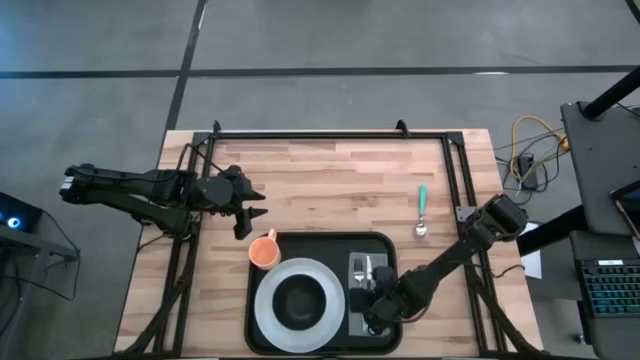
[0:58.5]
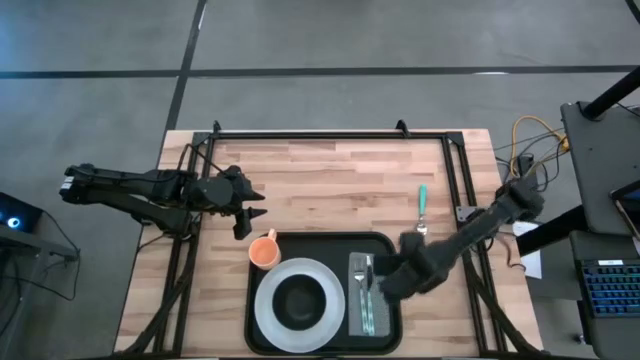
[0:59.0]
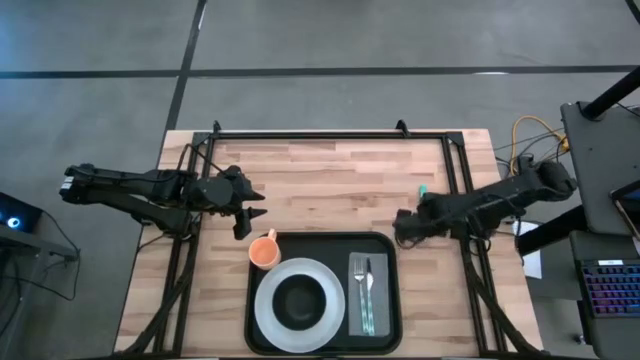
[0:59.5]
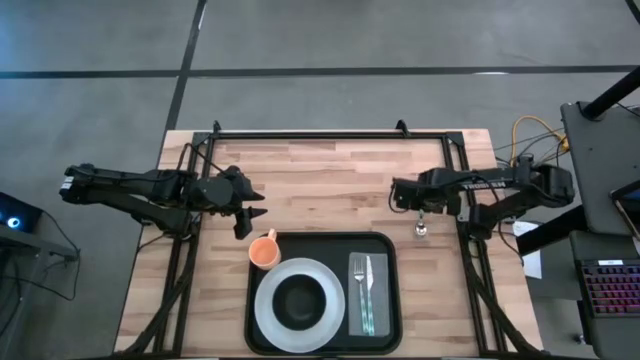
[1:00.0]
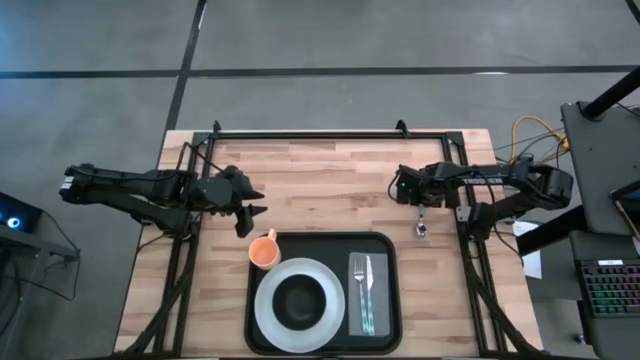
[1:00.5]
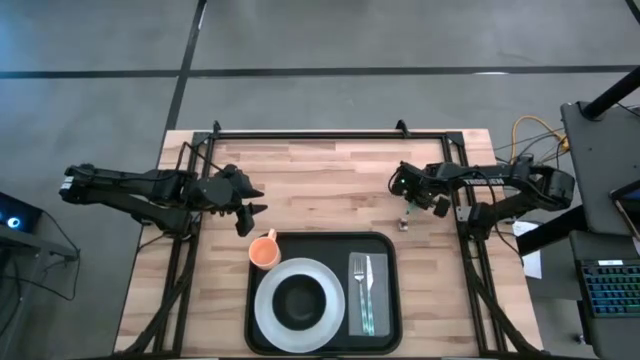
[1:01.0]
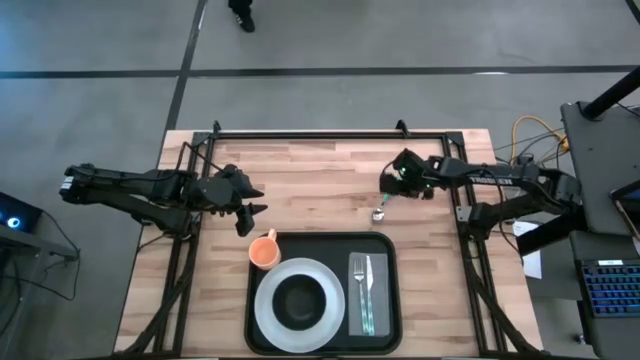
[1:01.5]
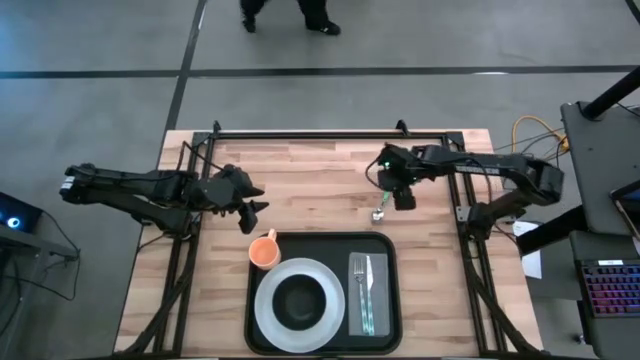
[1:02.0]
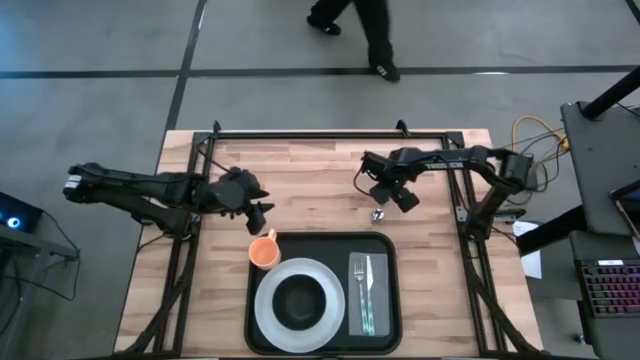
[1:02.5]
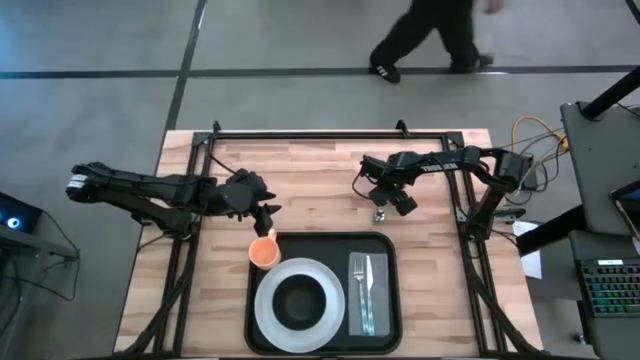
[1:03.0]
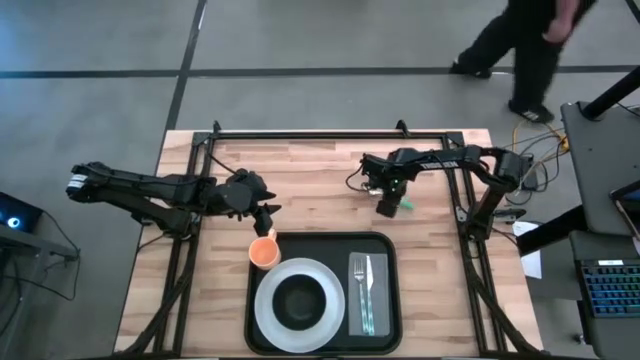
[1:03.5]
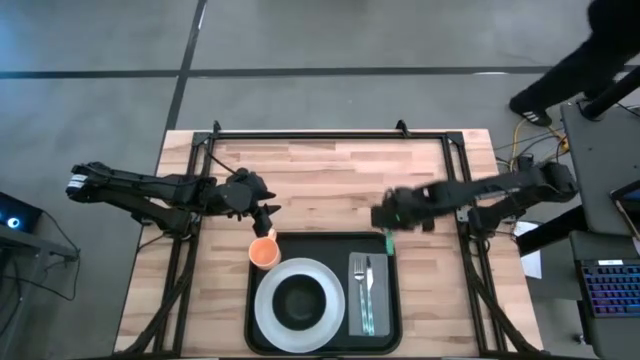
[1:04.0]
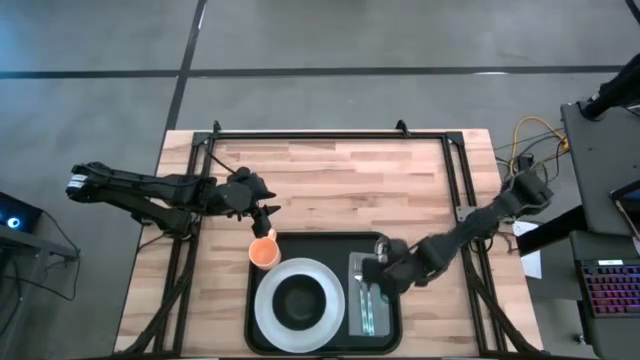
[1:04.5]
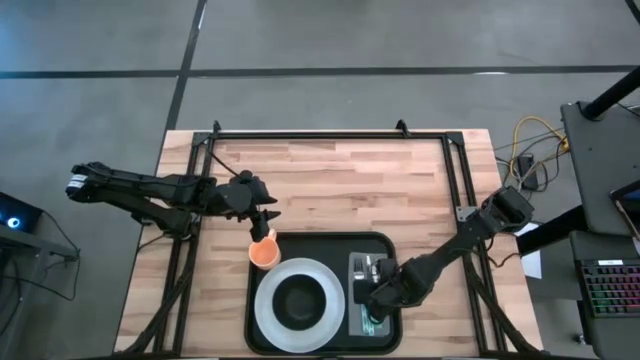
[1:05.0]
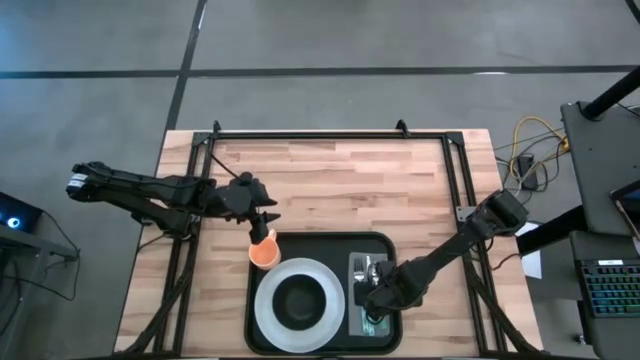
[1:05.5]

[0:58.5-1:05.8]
Task: Set up tray
Put the green spoon on the gray napkin to the right of the blue knife

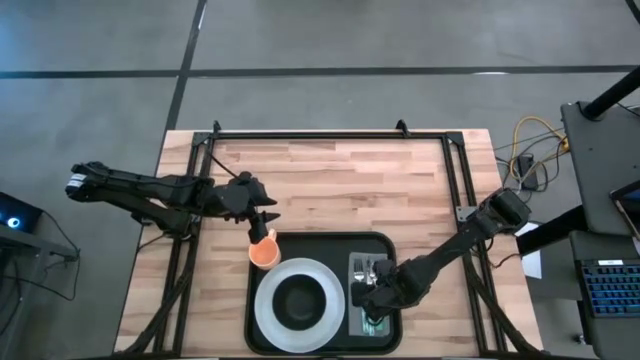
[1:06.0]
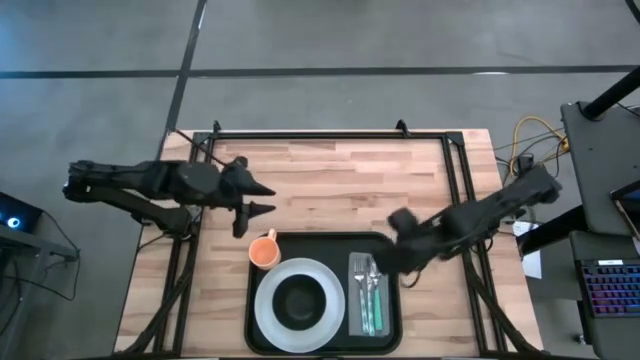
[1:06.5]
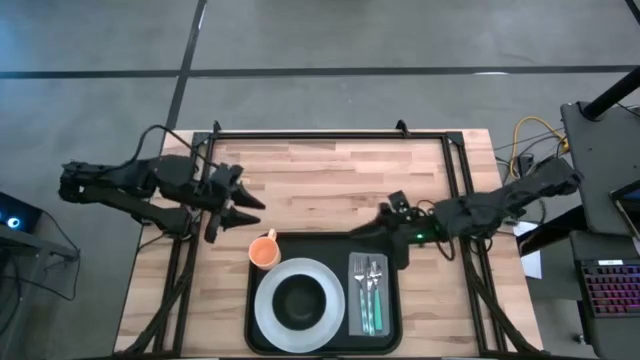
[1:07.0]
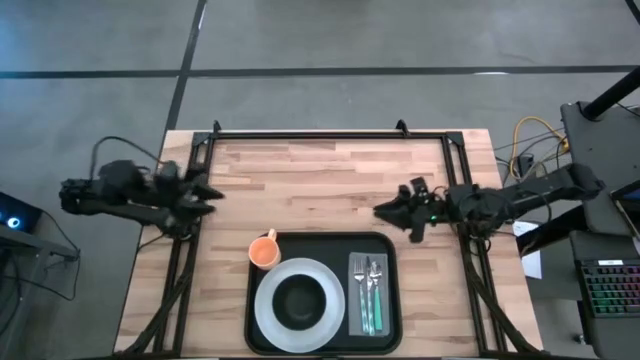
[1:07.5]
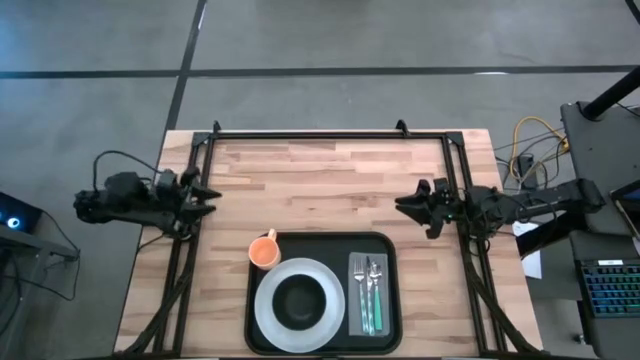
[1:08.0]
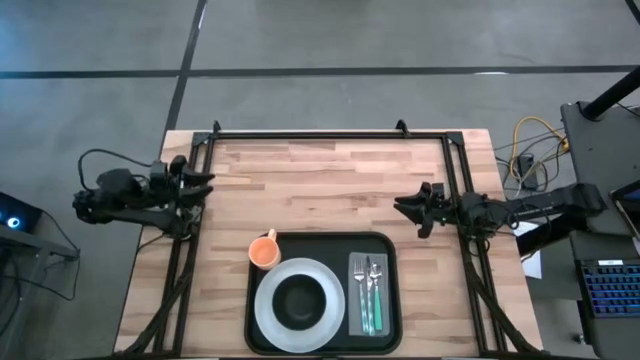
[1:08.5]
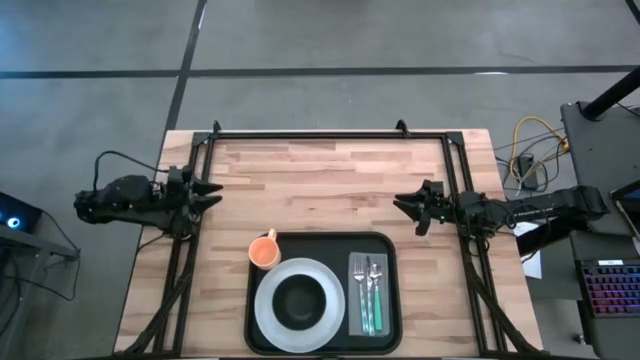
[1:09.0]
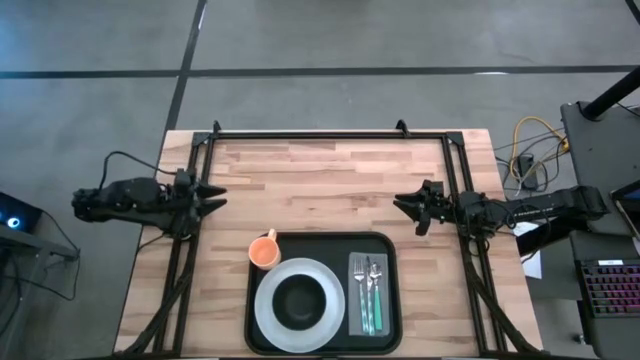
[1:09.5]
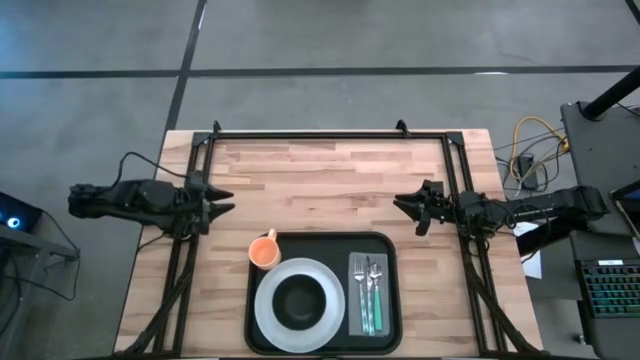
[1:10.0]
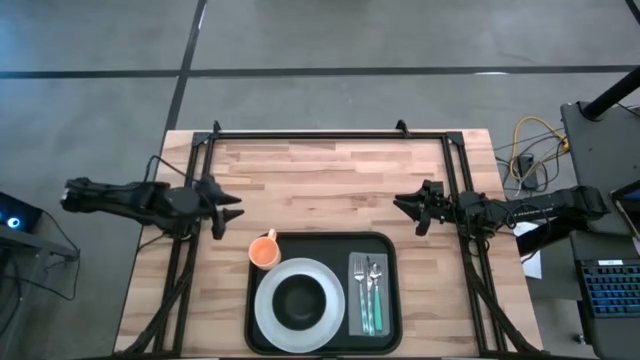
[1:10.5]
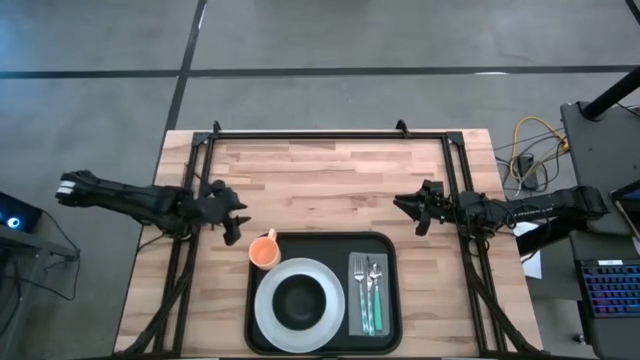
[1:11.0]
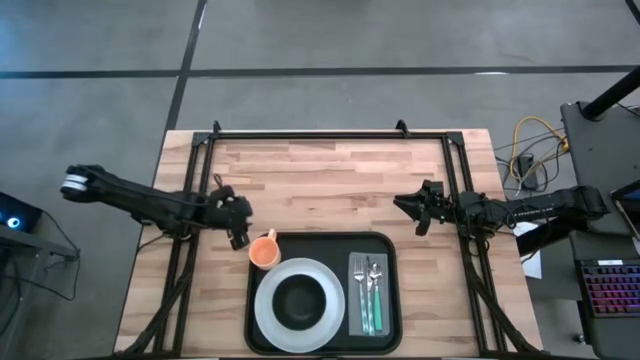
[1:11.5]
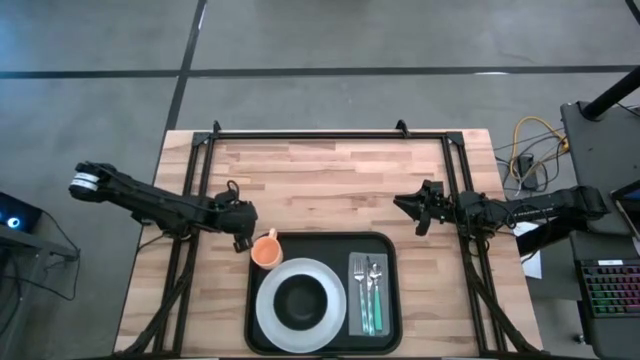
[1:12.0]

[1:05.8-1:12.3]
Return to Home Position

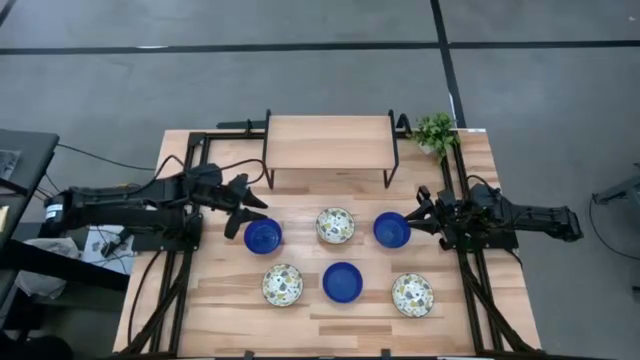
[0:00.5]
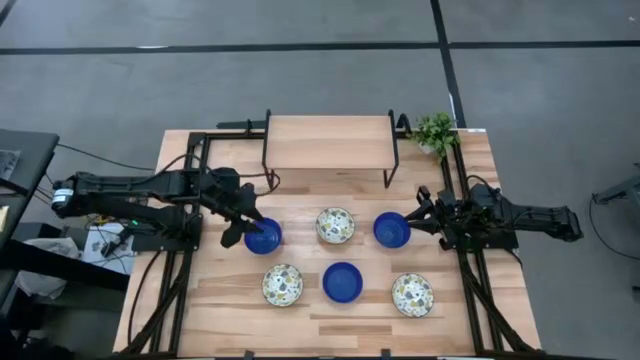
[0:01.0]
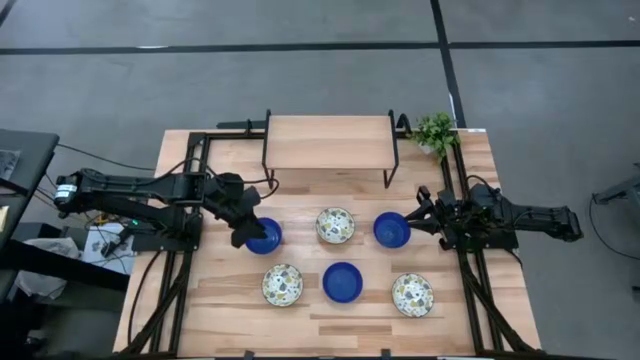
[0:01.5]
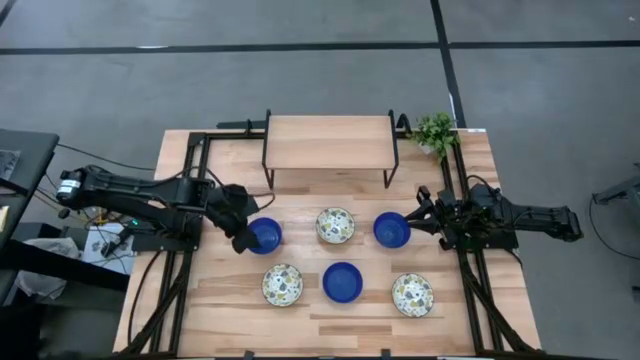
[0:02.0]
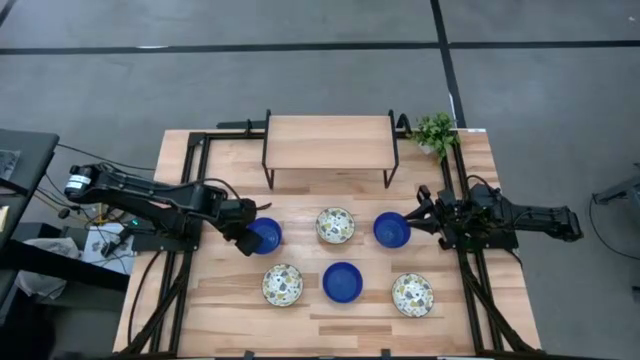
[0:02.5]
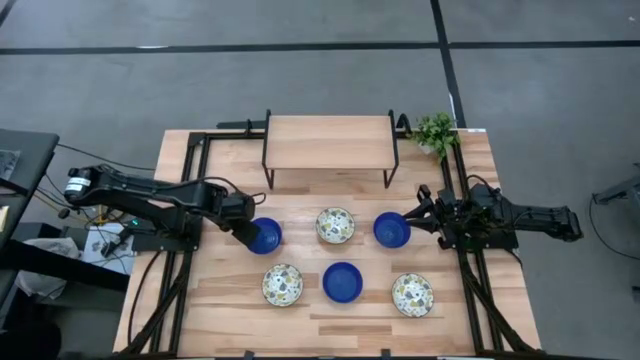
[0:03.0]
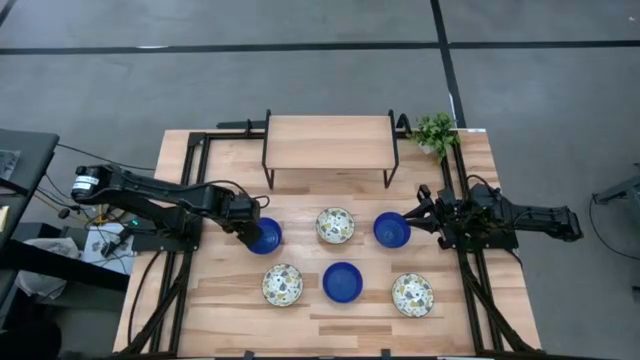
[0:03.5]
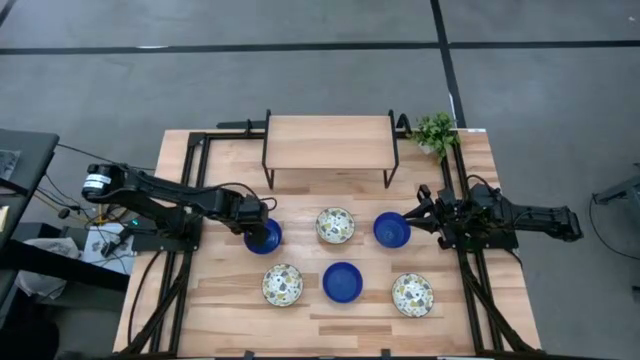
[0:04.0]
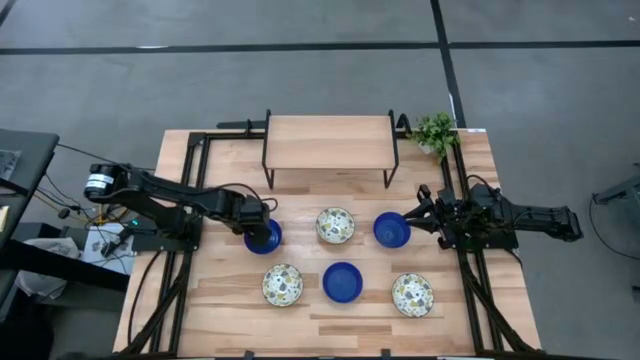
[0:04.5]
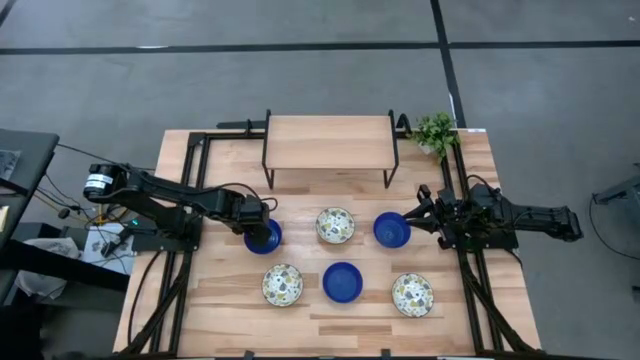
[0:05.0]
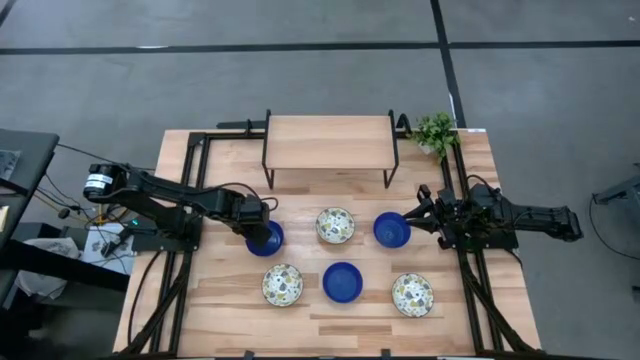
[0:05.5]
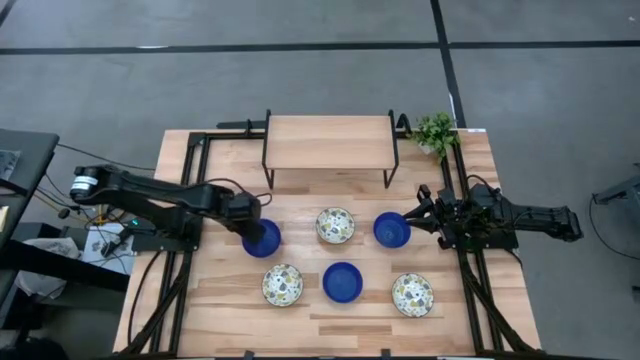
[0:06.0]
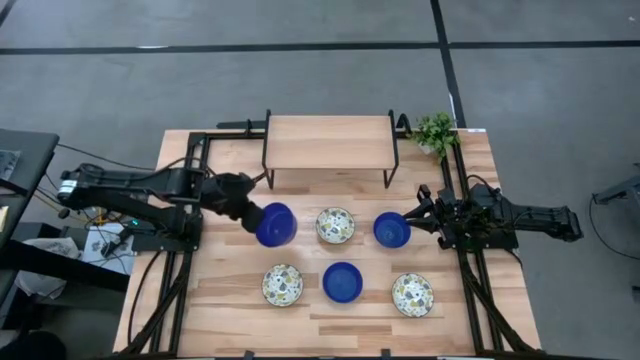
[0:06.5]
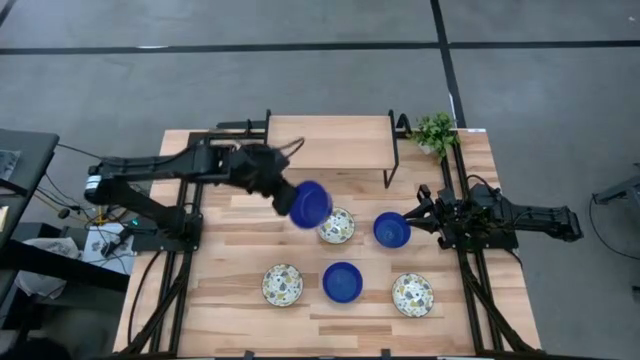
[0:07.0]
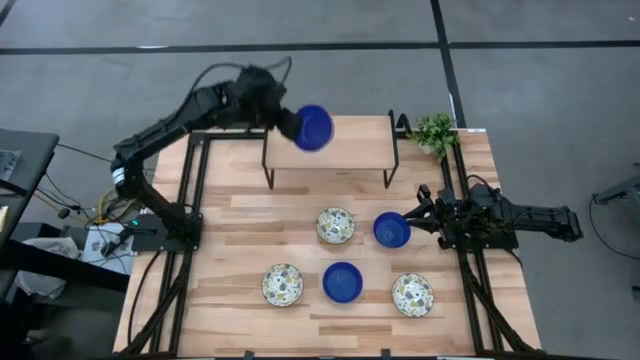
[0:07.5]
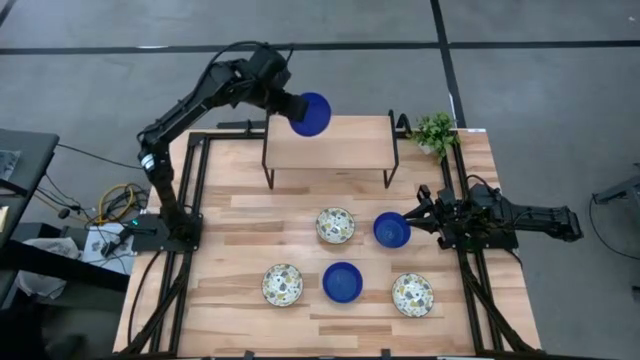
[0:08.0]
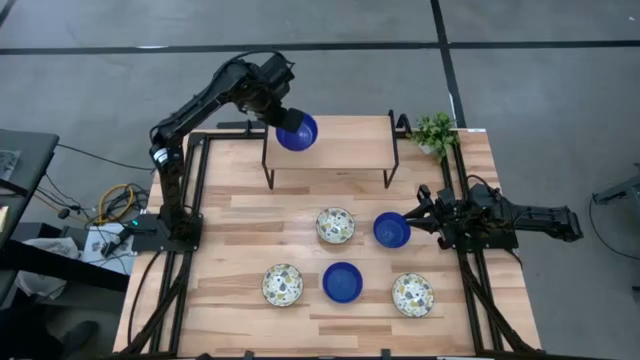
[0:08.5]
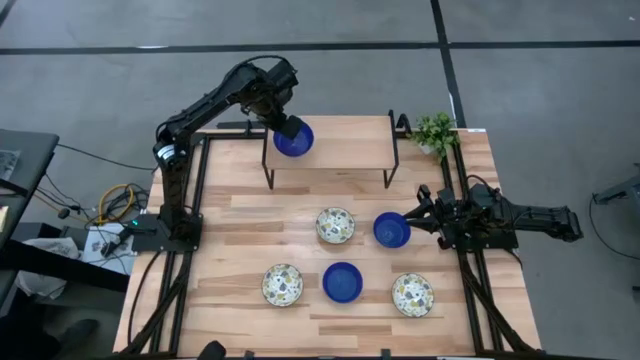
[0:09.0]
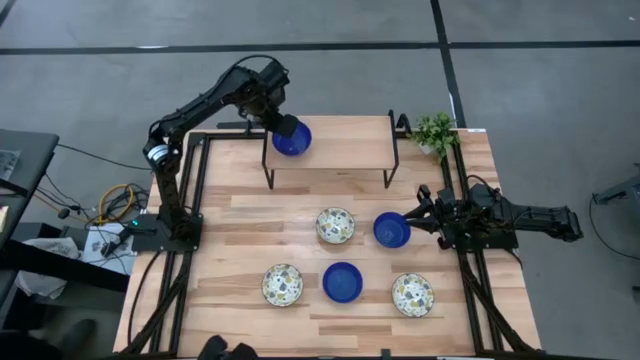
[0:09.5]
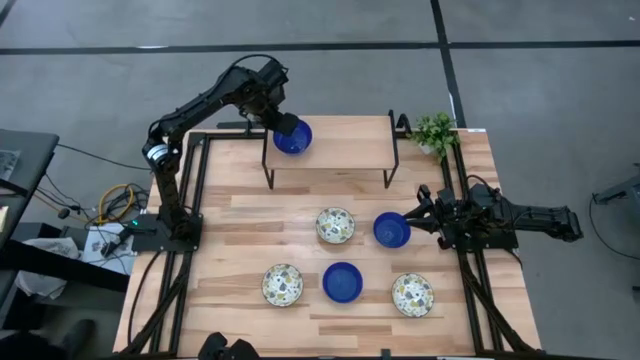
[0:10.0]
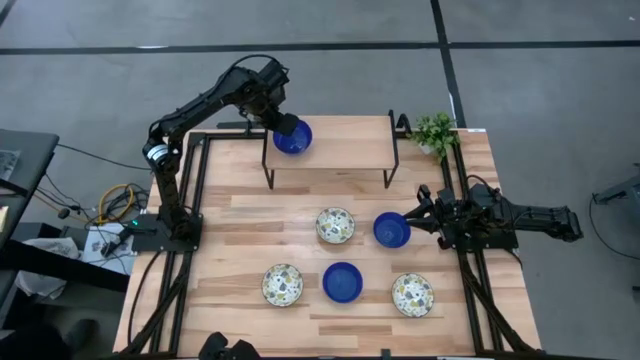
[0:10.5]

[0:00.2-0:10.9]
Task: Pick & Place Mini bowls
Put the top left blue bowl on the shelf
